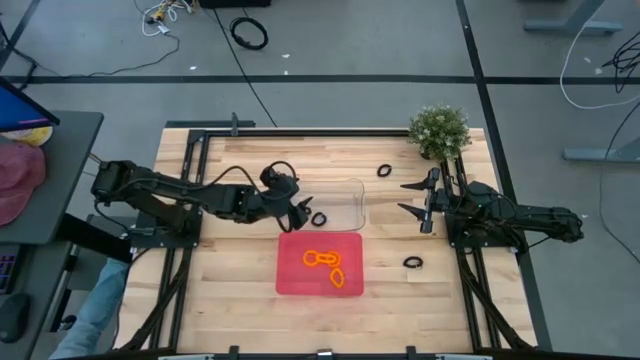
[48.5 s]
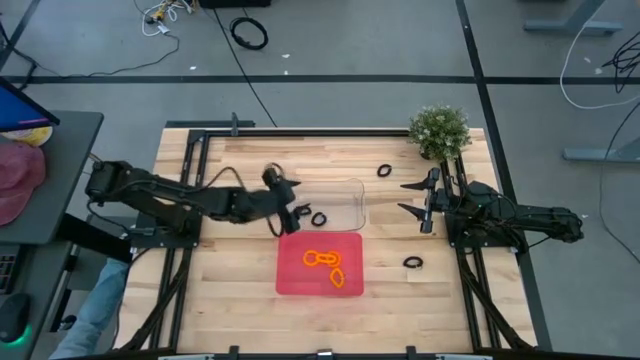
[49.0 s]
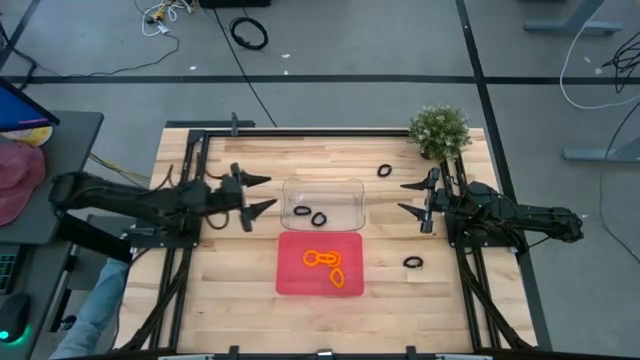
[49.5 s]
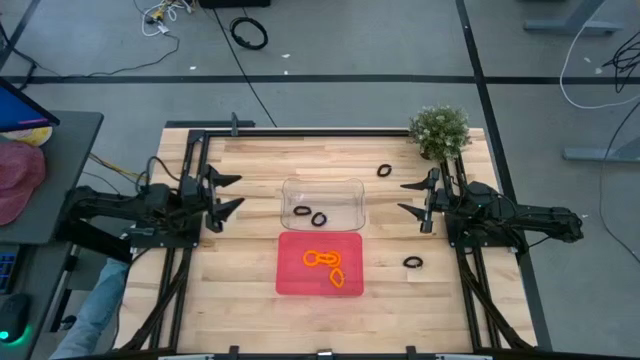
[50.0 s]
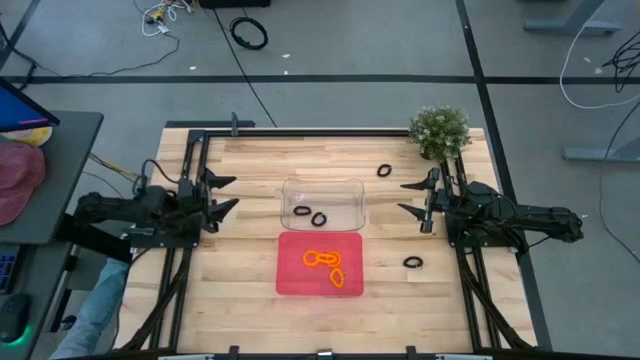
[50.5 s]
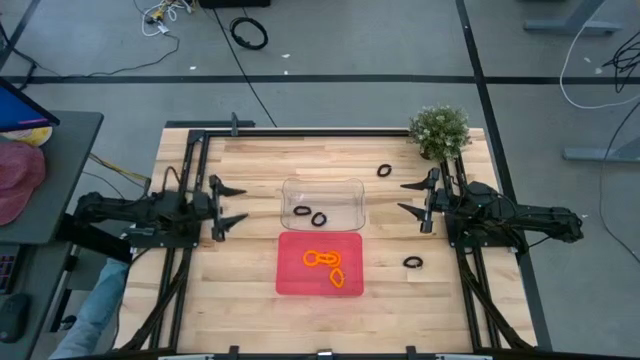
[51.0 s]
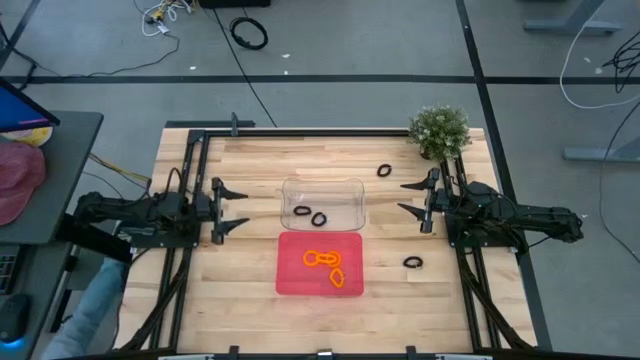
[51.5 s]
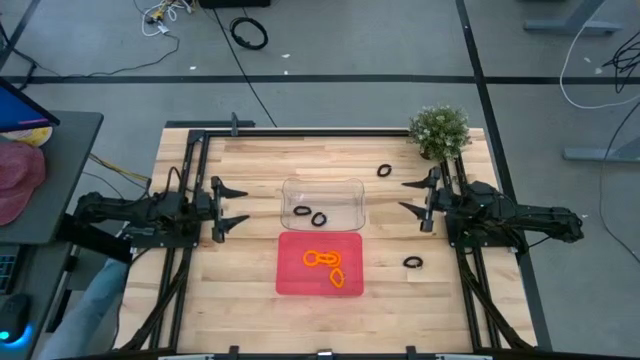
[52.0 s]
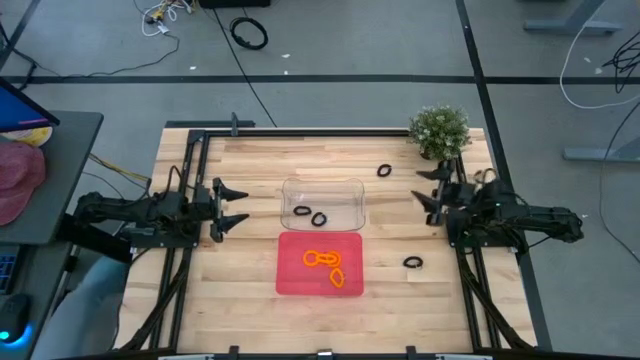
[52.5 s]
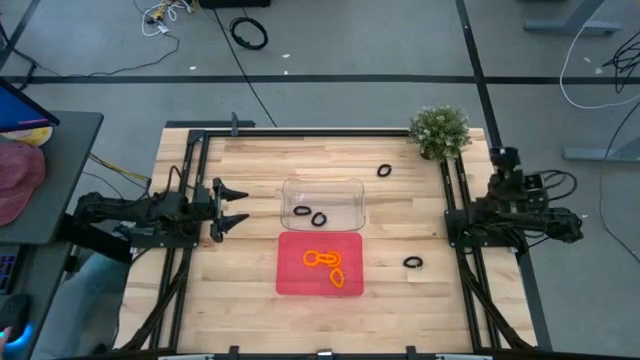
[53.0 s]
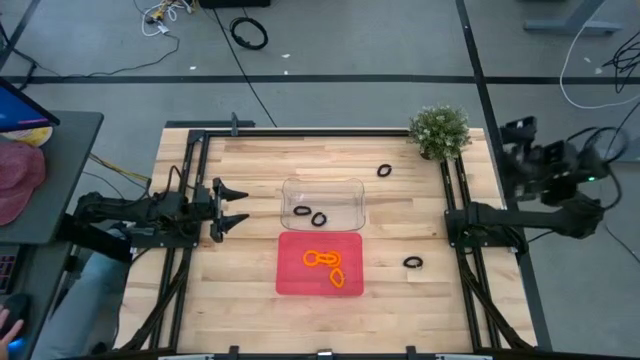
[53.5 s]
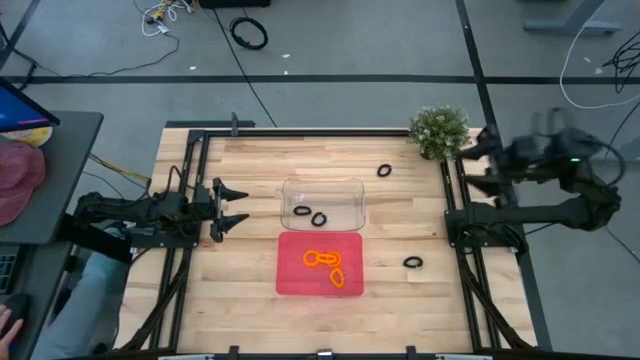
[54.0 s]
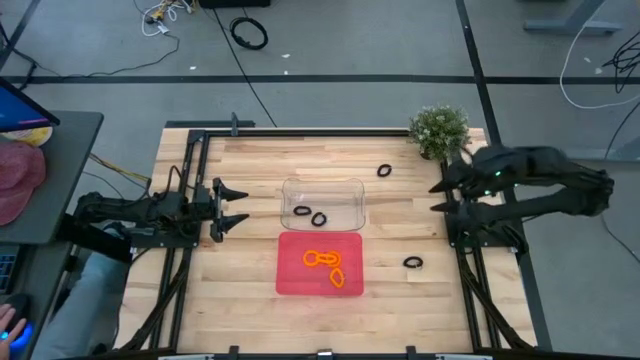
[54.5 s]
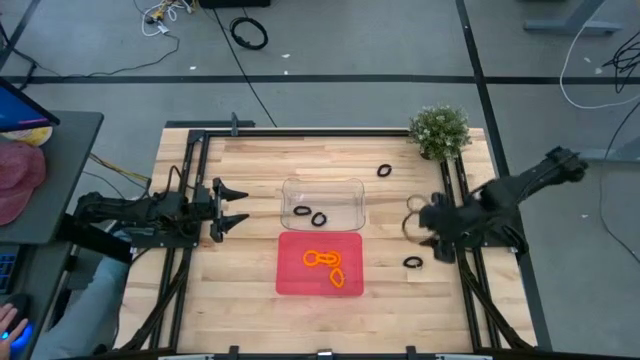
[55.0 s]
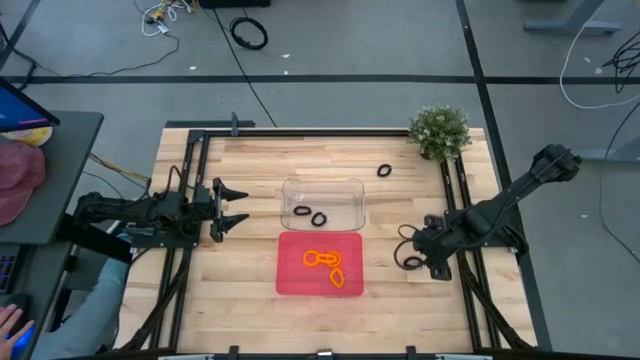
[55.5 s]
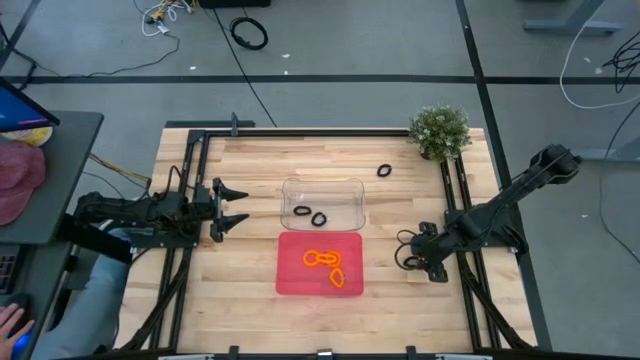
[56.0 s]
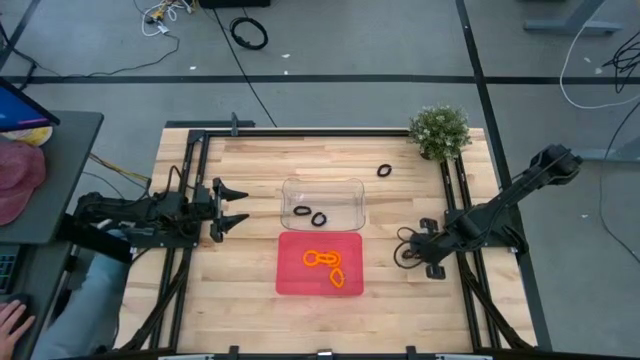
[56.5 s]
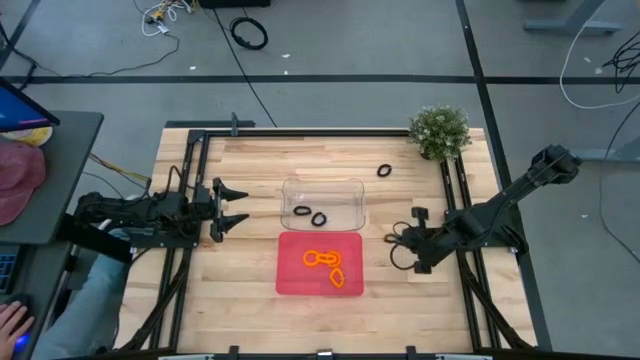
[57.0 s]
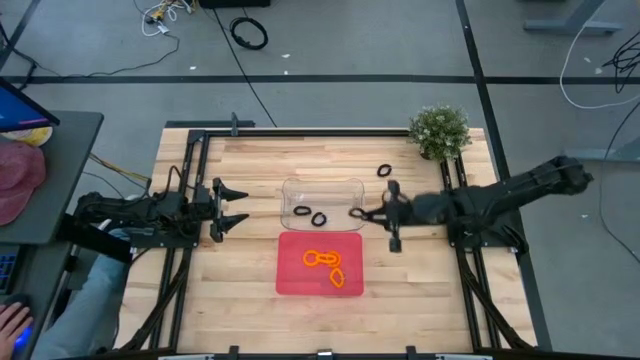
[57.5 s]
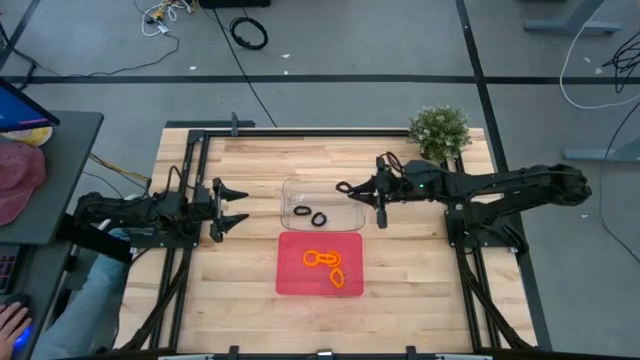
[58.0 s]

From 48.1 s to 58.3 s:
Task: Sort spring keychains
Put the black spring keychain into the transparent bin

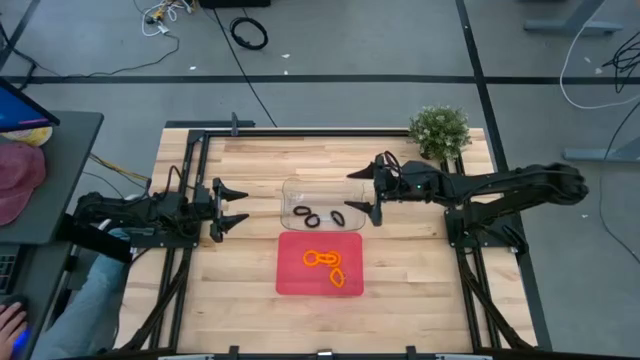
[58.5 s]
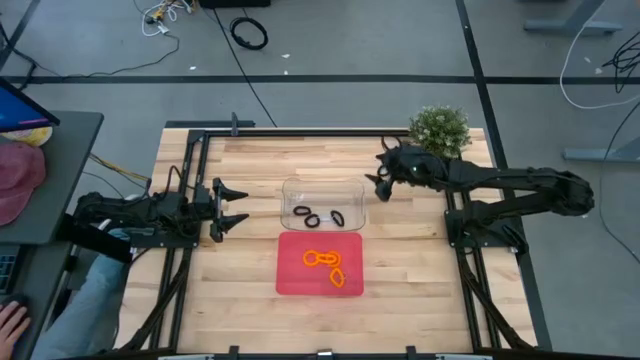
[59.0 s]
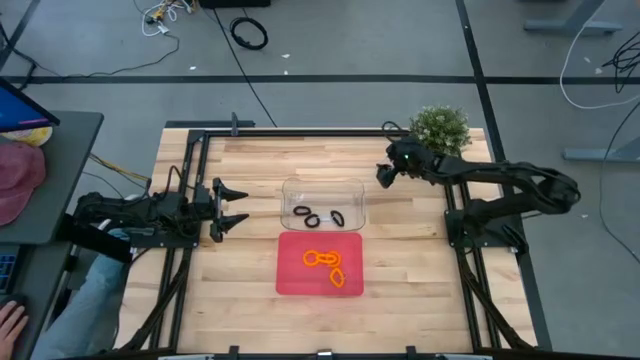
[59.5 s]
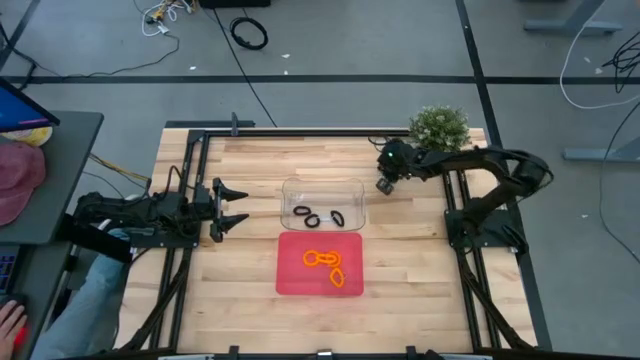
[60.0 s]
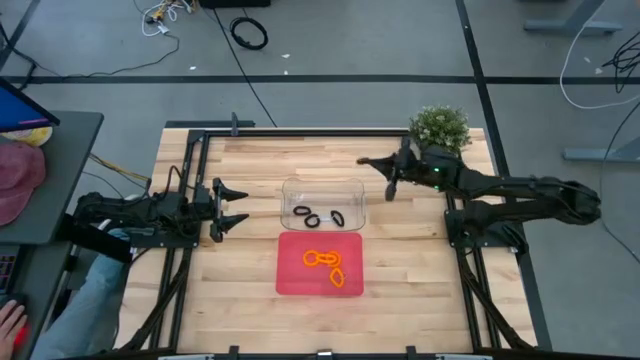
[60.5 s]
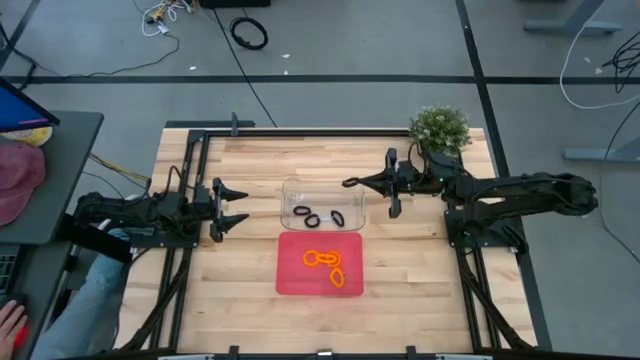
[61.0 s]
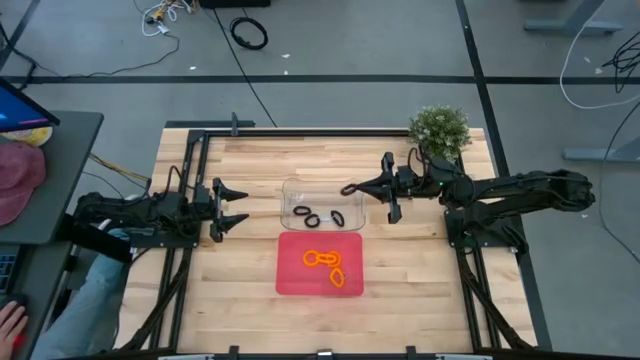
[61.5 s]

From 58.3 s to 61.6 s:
Put the black spring keychain into the transparent bin

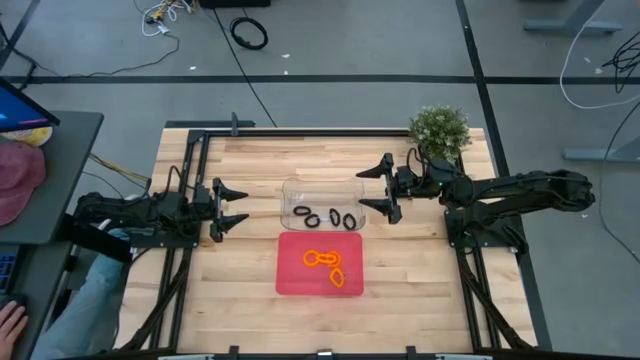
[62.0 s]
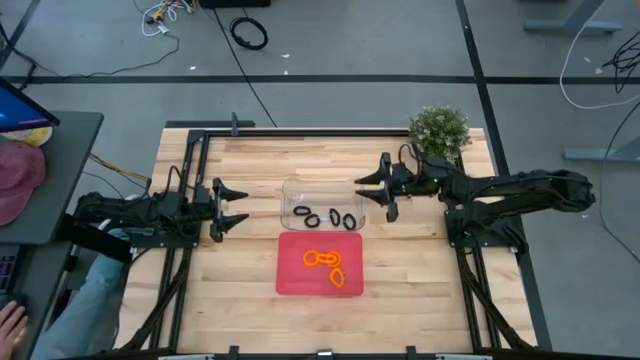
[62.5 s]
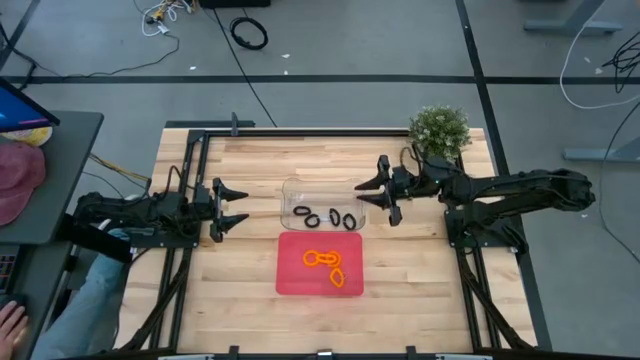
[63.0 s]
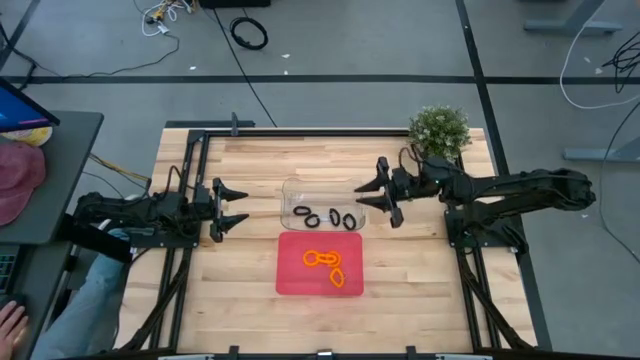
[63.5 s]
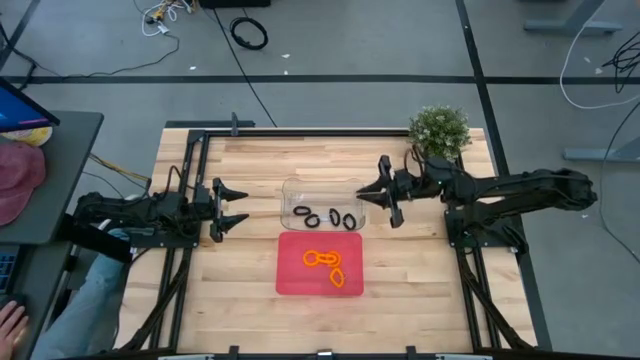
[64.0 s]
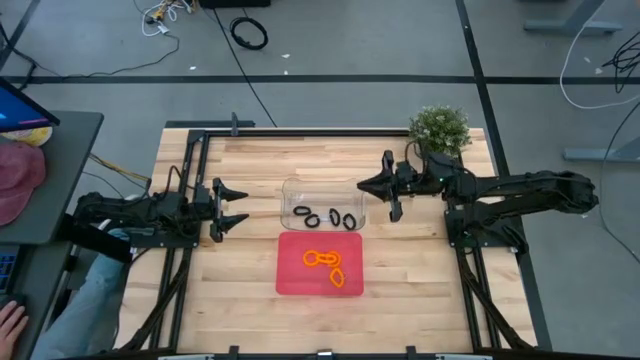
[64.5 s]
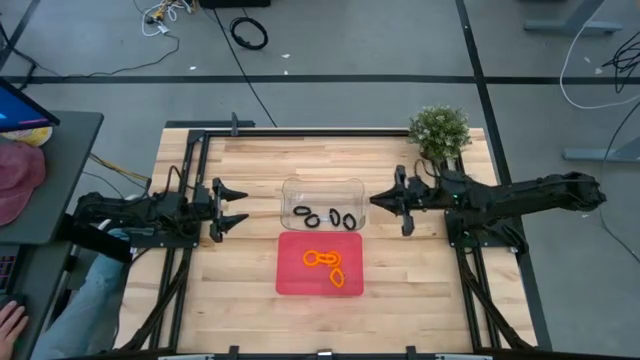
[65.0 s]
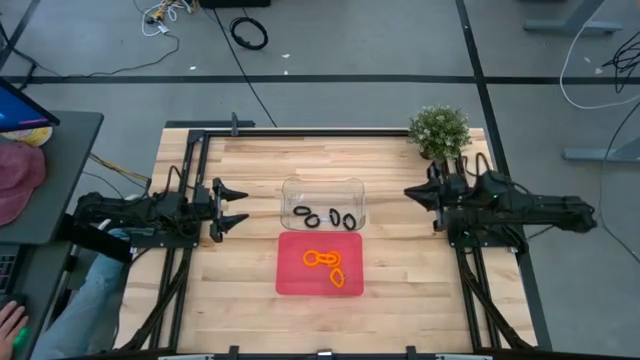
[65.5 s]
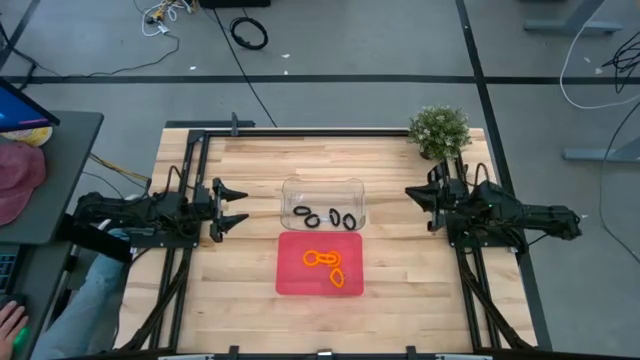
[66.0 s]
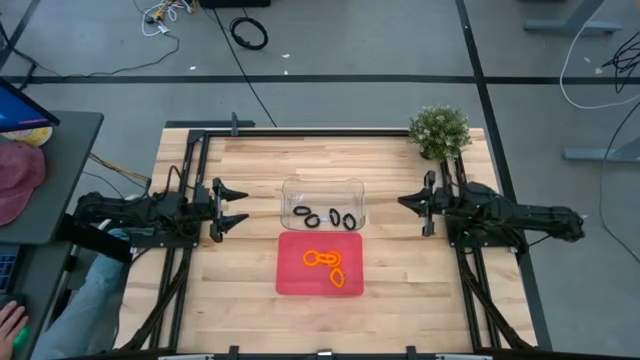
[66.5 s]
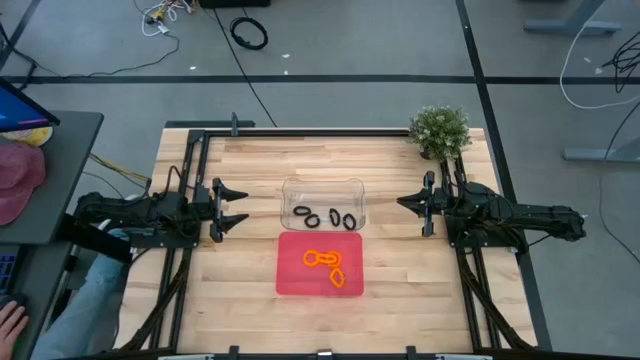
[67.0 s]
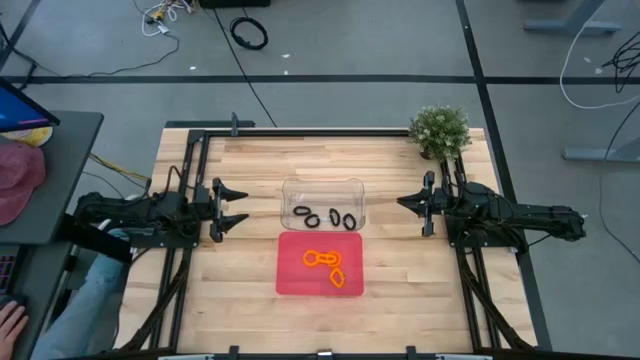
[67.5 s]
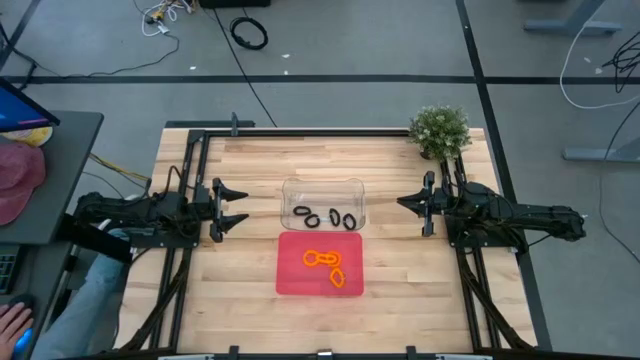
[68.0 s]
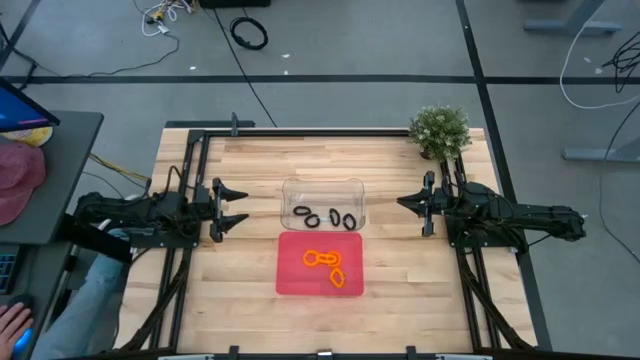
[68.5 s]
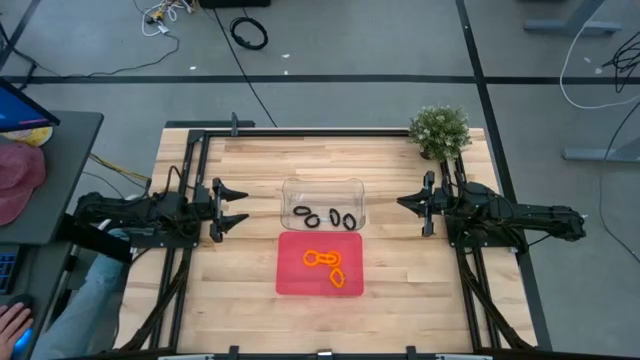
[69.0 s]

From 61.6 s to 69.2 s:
Return to Home Position

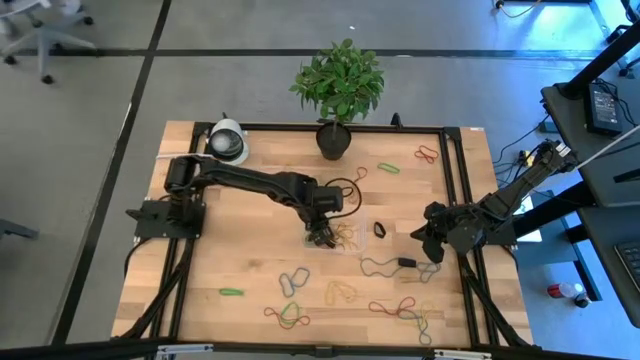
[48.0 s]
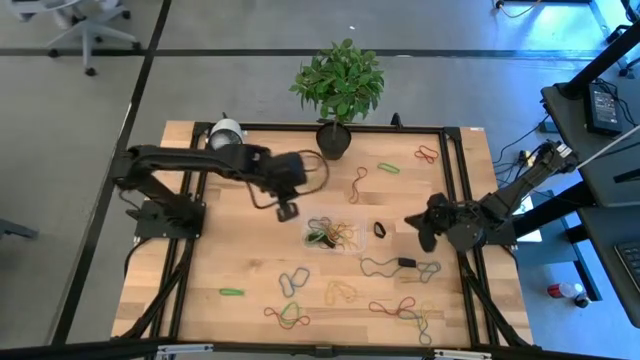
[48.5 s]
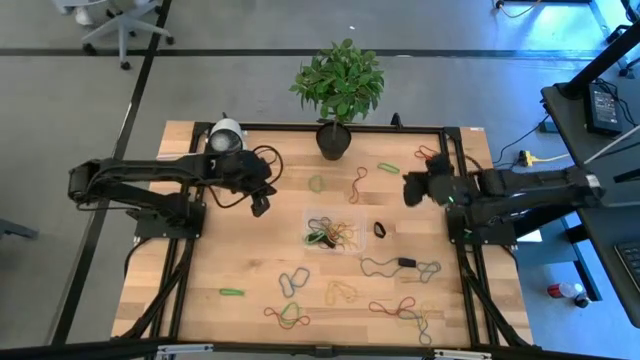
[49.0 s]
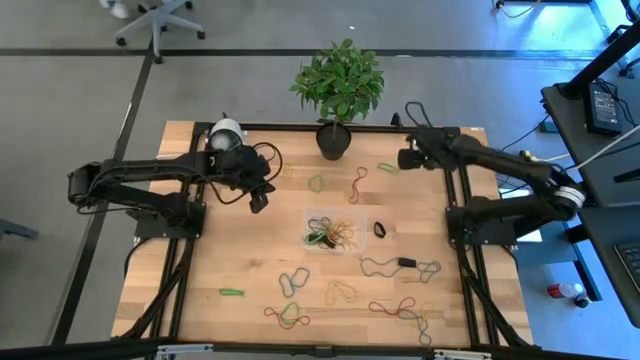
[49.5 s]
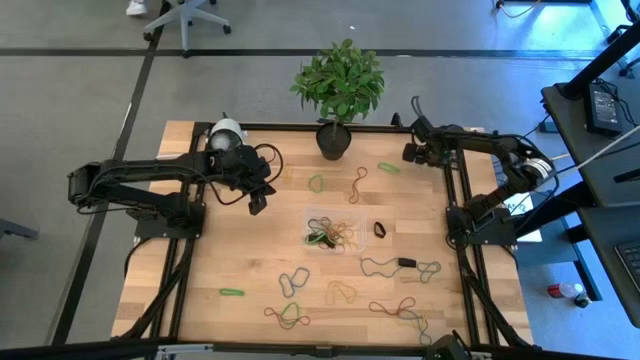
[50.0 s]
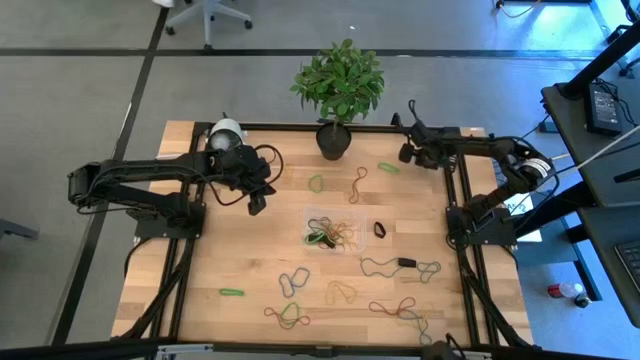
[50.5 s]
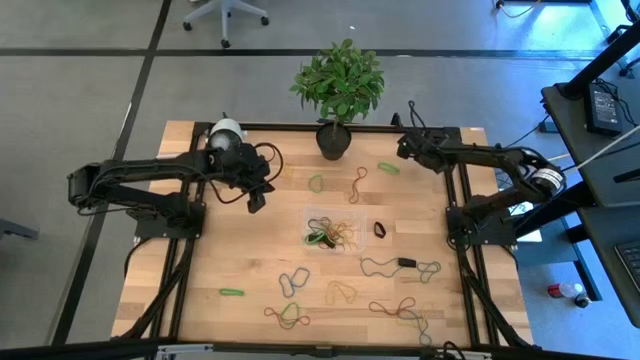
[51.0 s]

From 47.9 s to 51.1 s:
Task: Pick and place rubber bands into bin
Put the red rubber band into the bin
